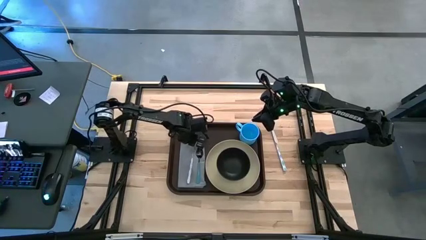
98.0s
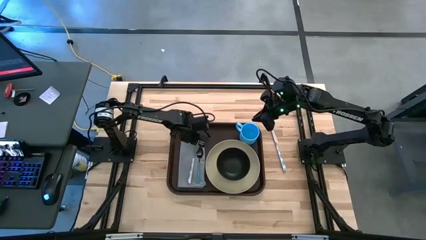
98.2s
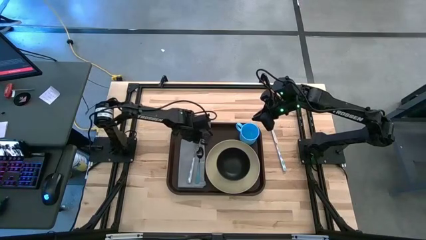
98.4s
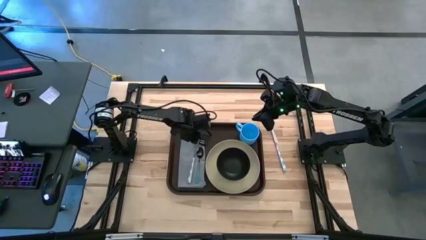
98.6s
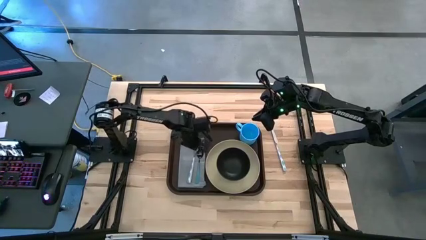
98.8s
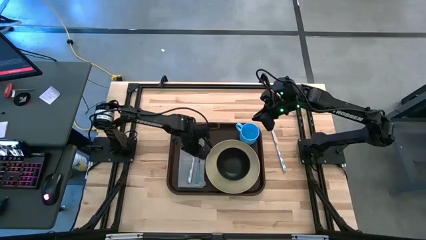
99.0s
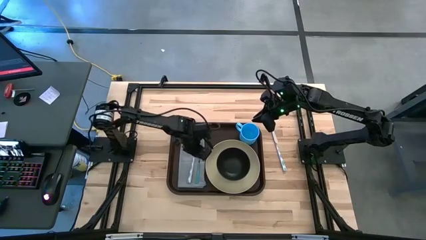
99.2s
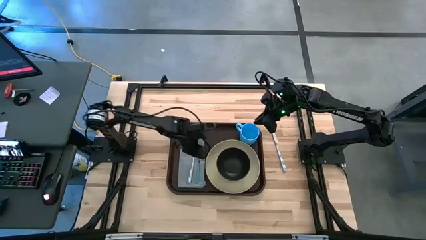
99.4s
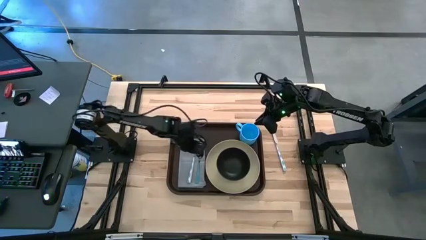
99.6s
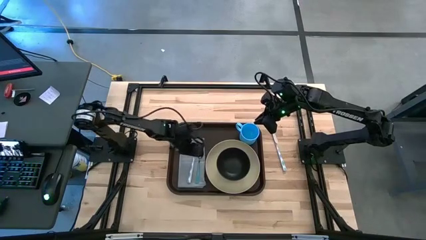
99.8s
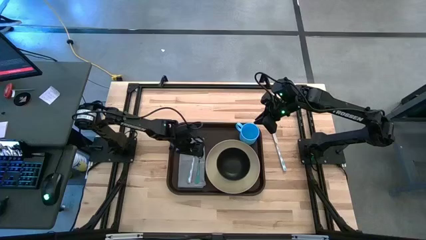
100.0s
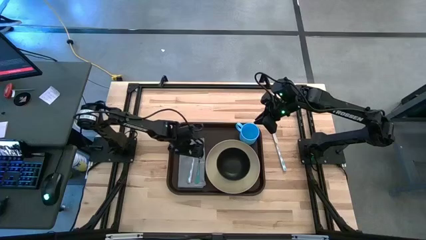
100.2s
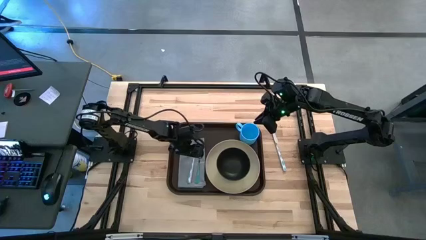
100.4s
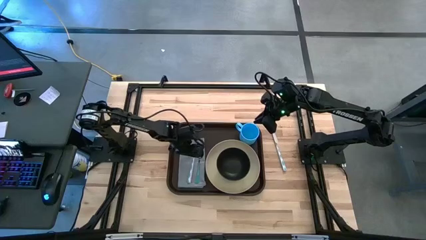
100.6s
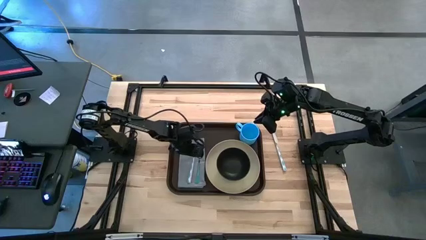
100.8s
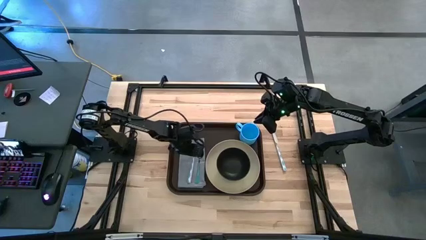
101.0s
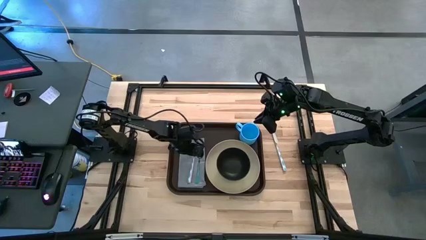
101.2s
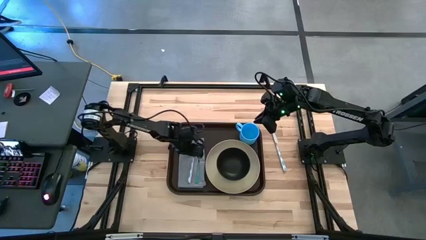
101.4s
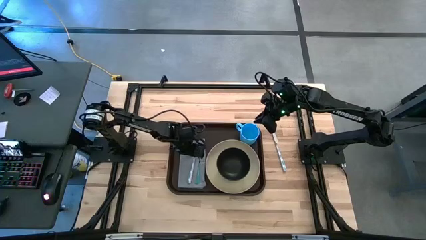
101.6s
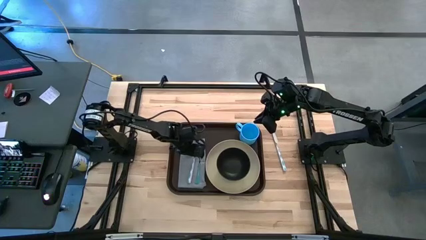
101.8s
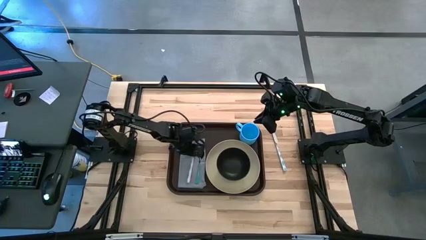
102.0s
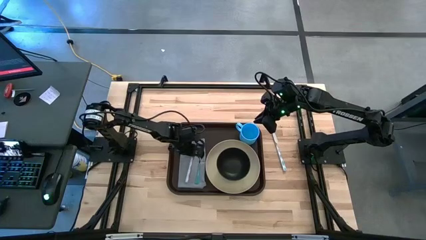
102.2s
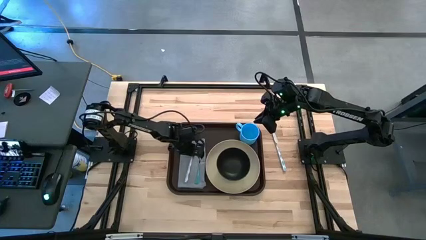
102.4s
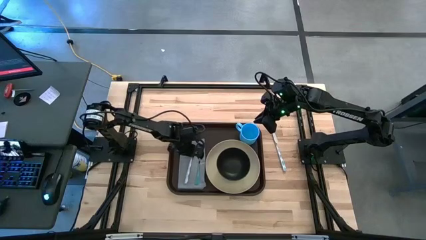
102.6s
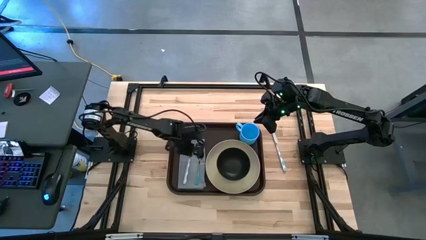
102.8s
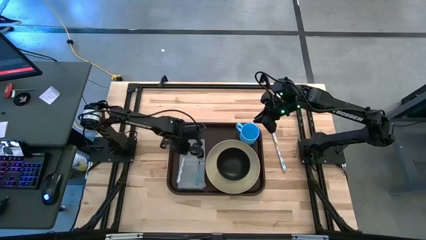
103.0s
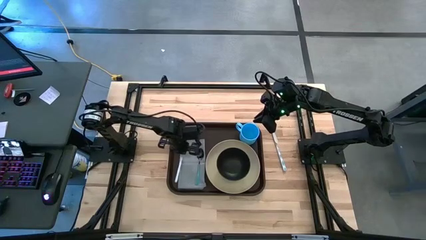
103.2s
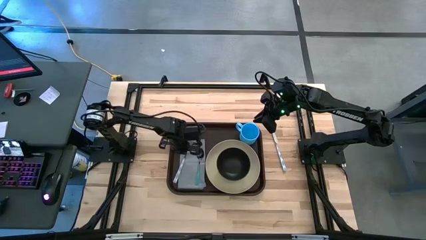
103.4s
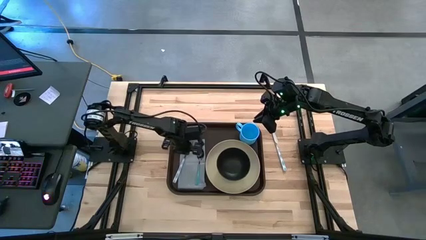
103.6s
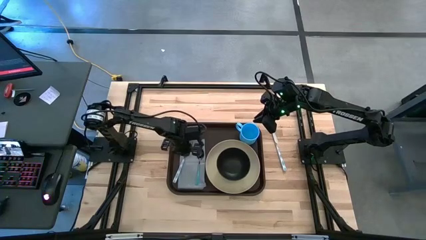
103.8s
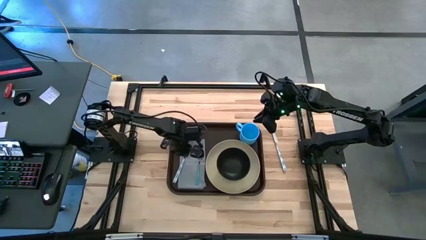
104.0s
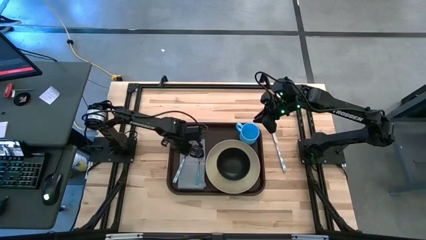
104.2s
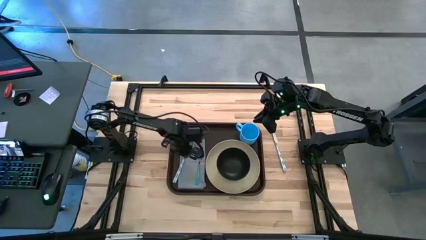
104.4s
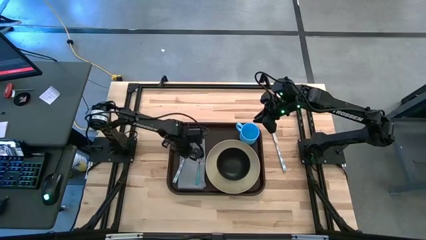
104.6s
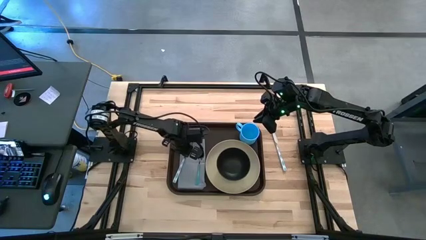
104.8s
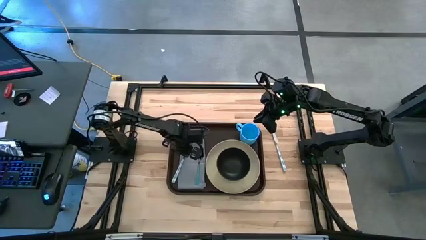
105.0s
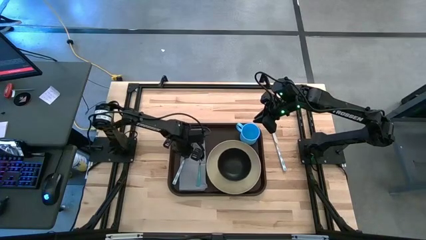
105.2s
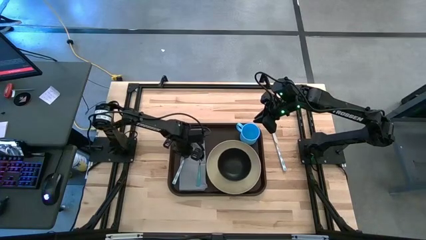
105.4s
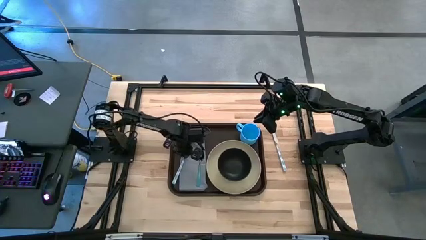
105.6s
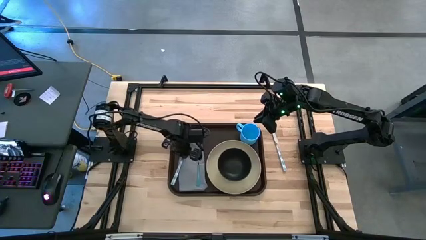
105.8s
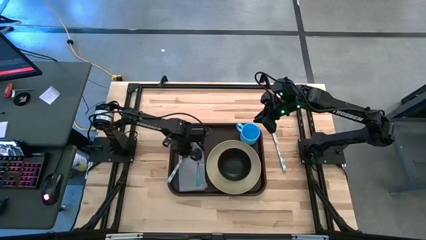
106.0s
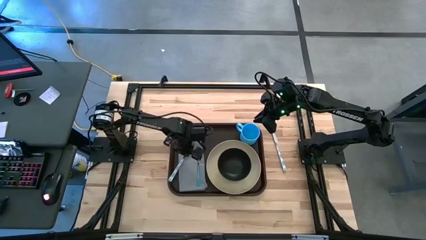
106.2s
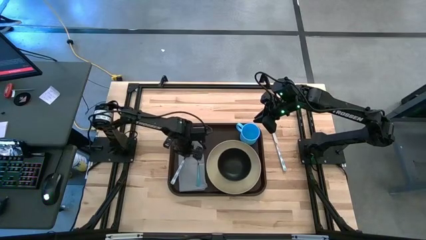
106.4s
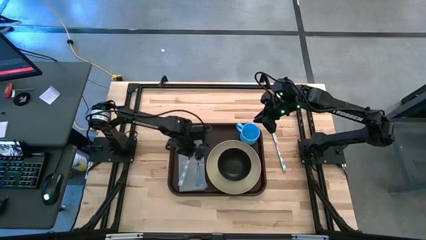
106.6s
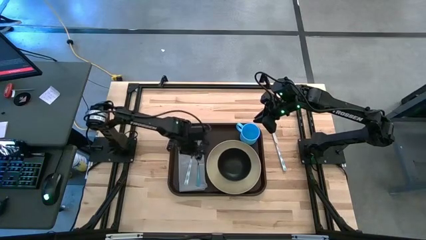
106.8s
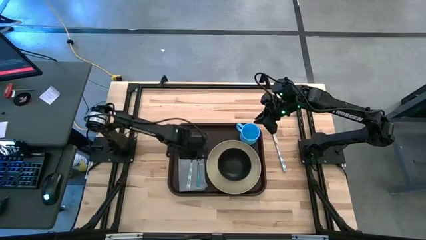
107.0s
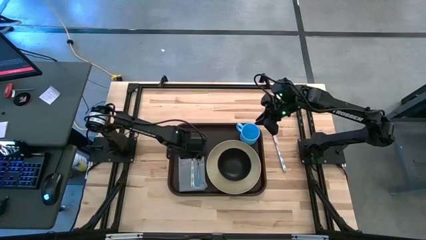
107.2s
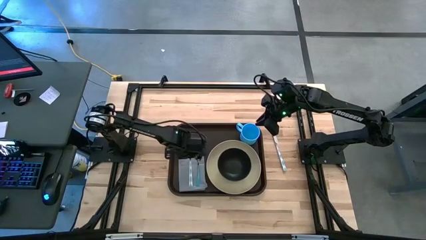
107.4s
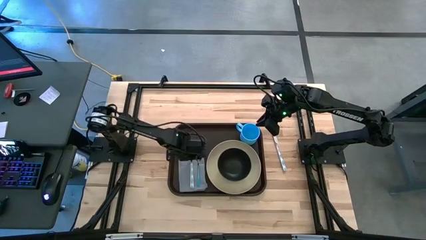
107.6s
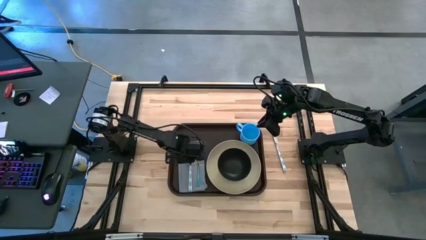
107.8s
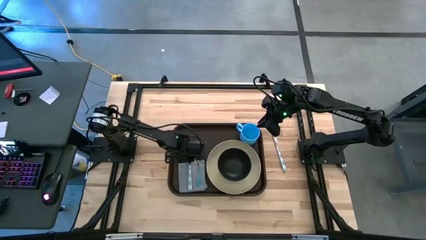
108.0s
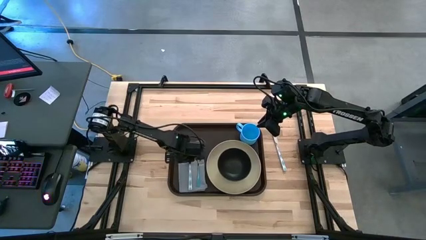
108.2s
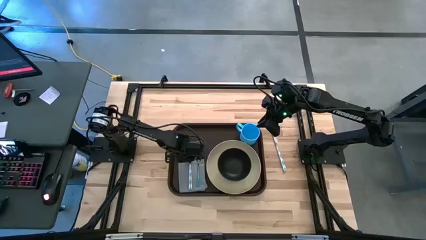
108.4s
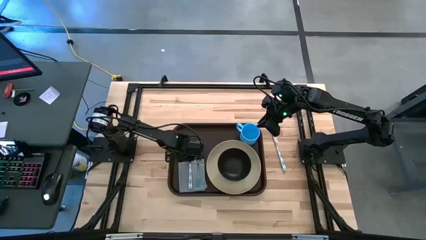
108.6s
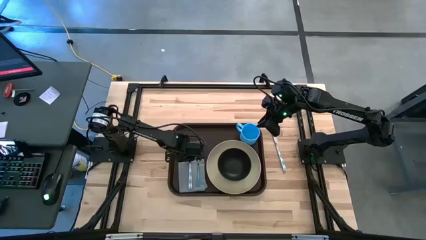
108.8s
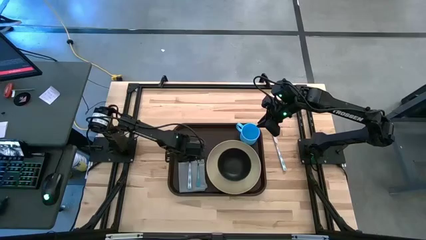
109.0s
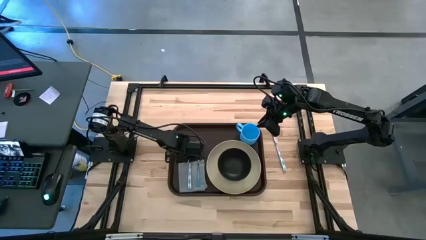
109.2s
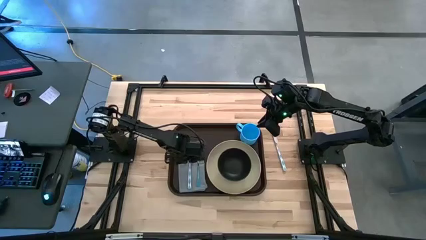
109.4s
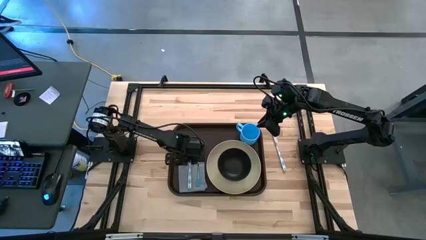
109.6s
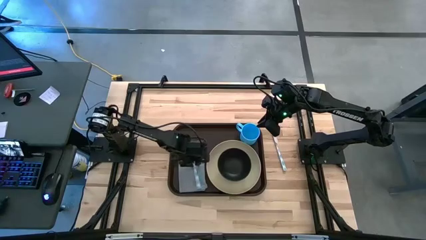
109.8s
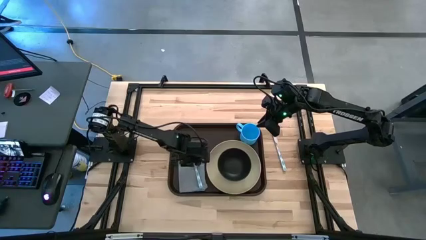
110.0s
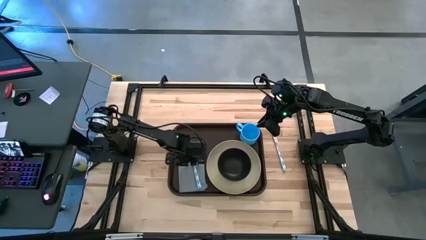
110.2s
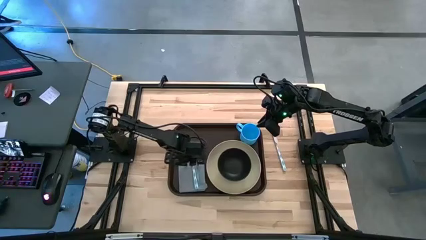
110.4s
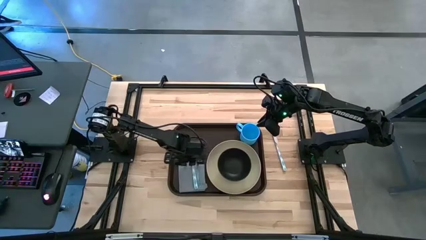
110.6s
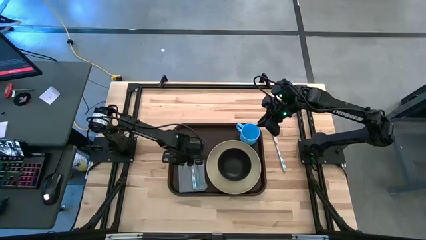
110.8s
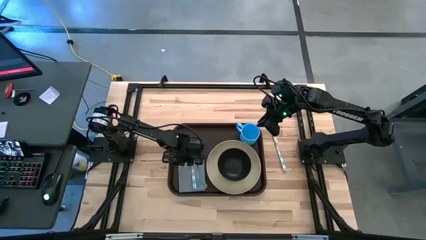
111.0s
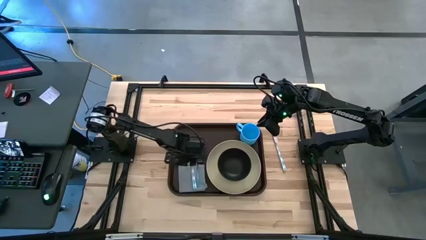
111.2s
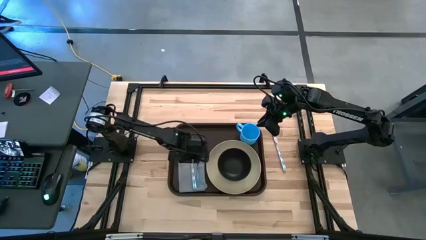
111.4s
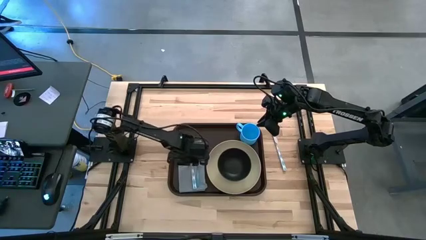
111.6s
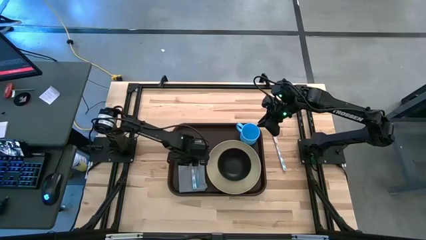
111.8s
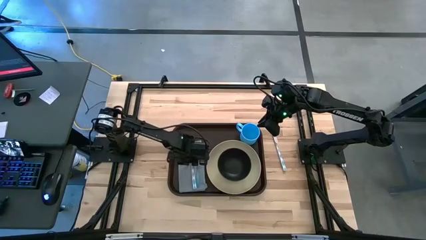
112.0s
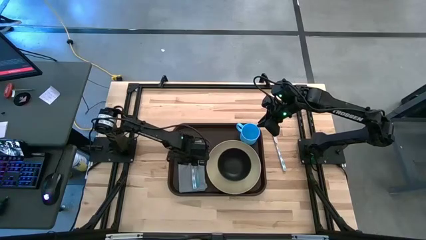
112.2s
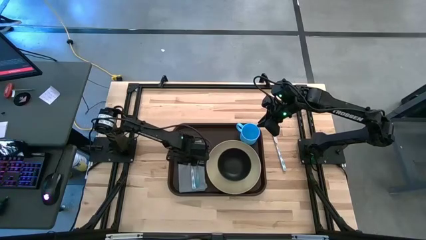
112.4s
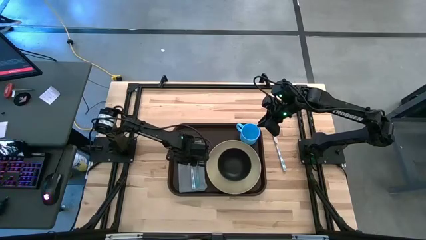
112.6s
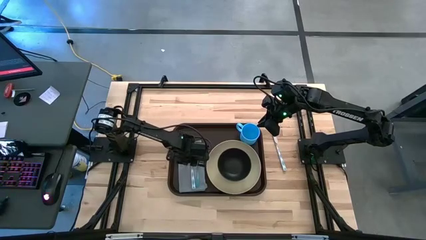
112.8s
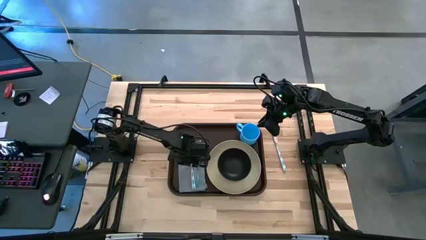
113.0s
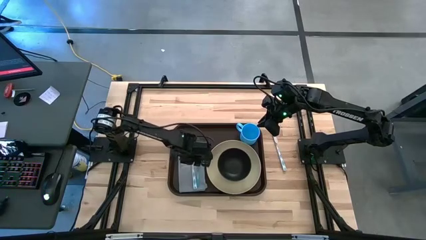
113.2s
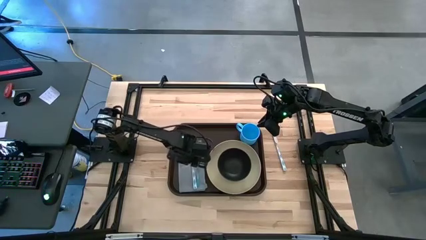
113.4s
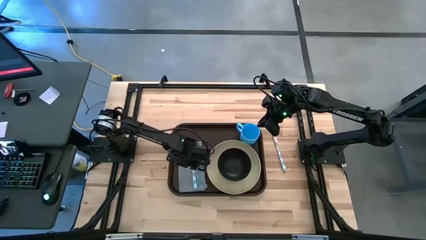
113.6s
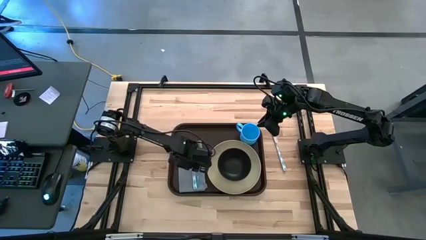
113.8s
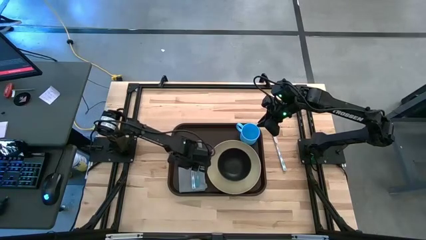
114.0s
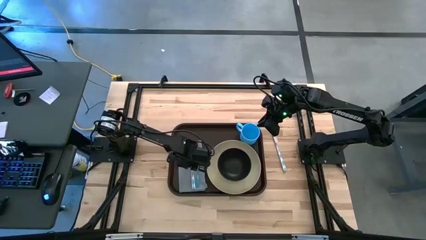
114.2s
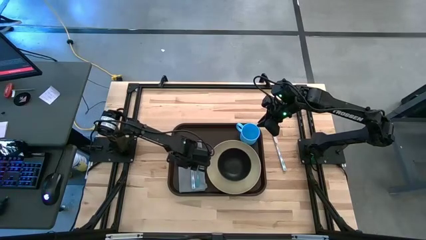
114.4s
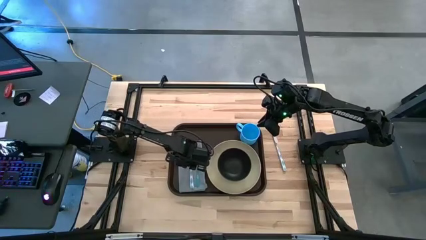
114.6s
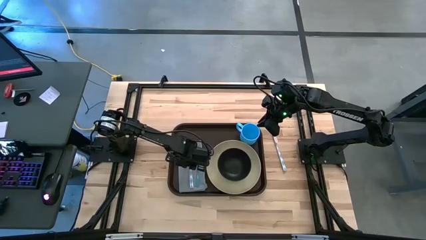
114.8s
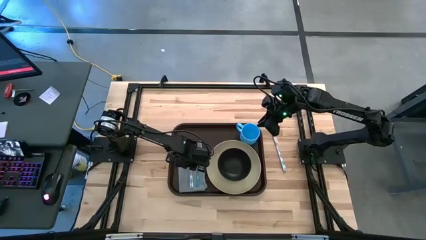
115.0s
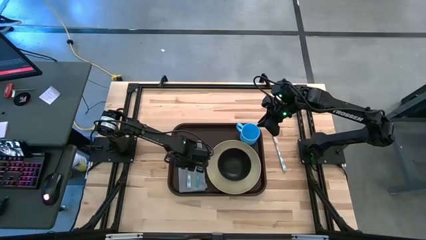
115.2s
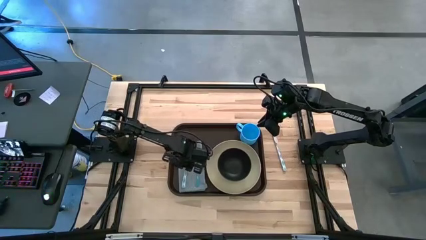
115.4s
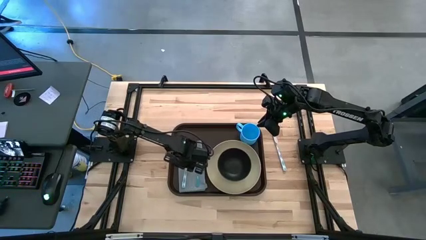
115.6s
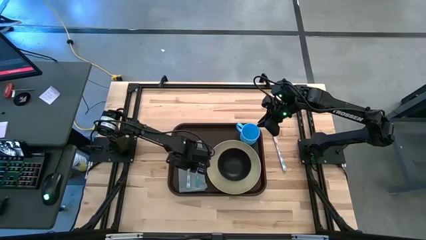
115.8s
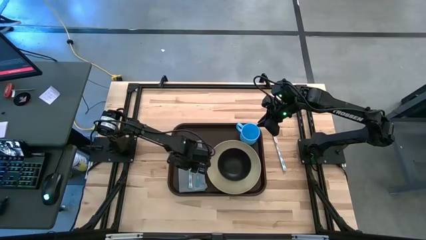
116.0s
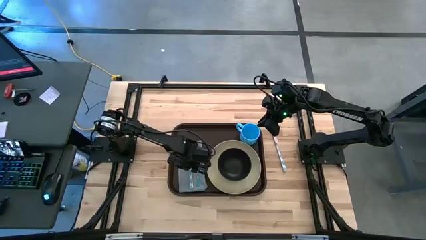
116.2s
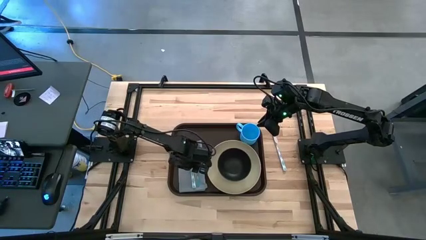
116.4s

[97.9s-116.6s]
Task: Set up tray
Put the blue patterned fork on the gray napkin to the left of the blue spoon
